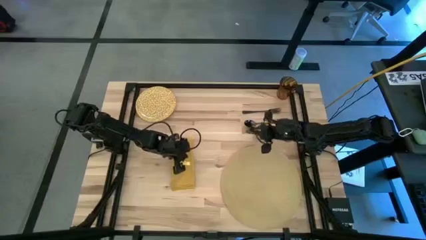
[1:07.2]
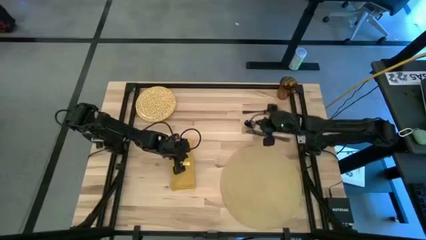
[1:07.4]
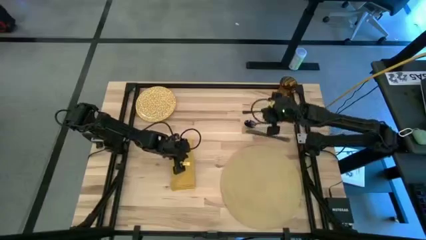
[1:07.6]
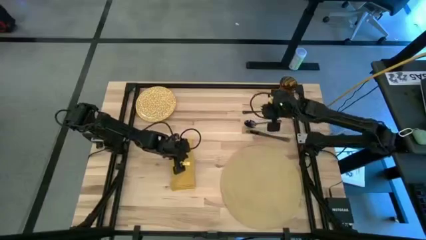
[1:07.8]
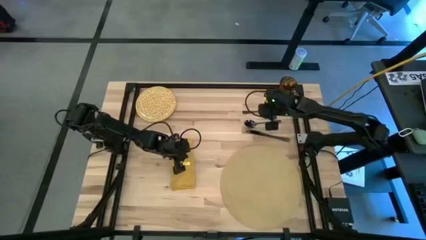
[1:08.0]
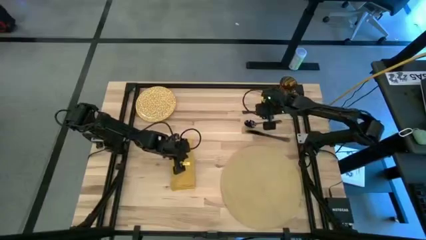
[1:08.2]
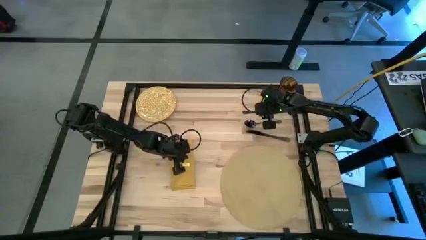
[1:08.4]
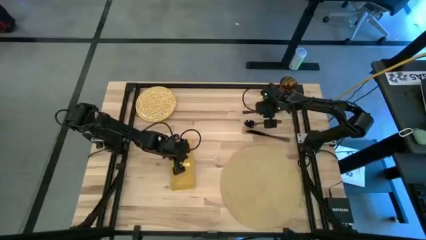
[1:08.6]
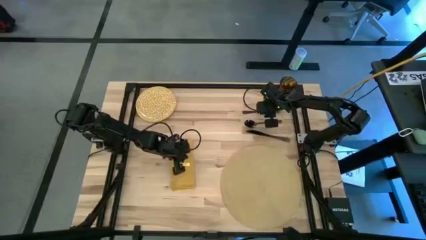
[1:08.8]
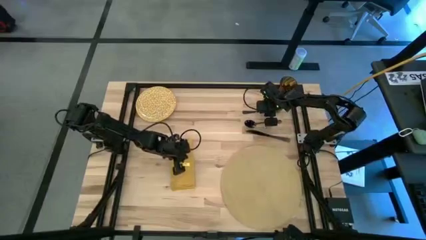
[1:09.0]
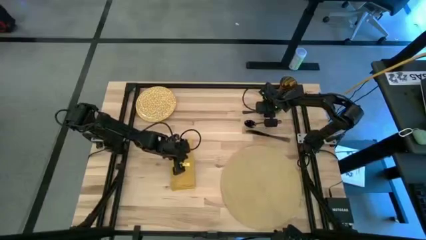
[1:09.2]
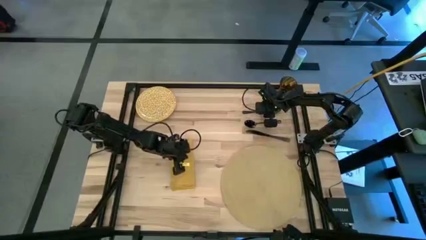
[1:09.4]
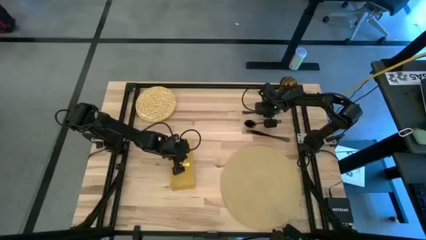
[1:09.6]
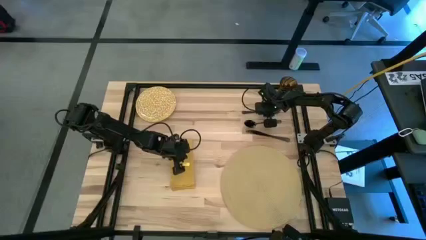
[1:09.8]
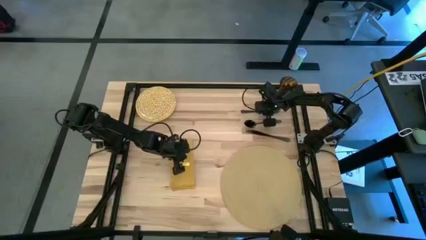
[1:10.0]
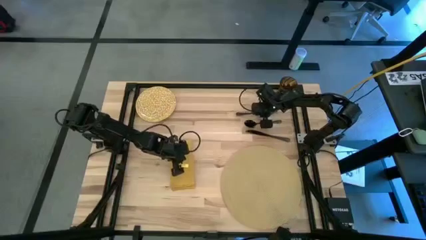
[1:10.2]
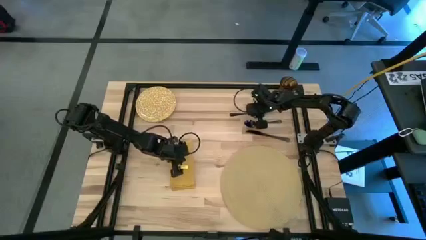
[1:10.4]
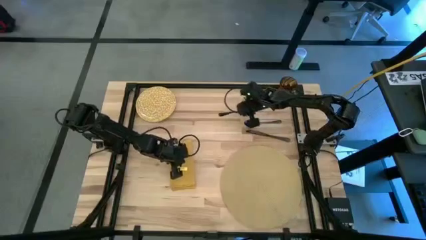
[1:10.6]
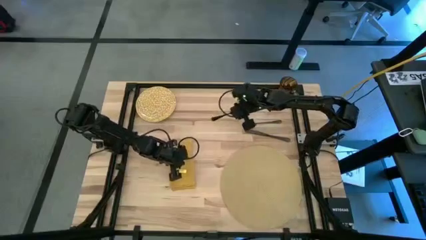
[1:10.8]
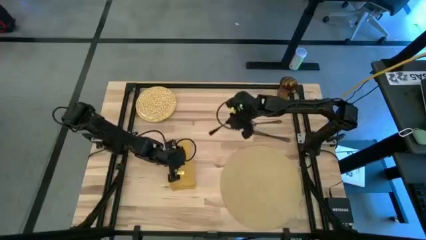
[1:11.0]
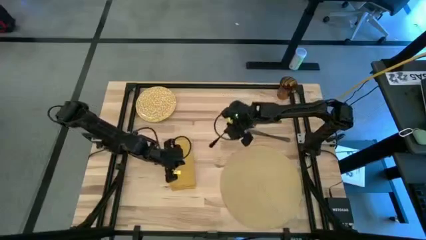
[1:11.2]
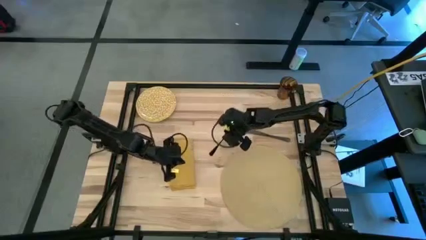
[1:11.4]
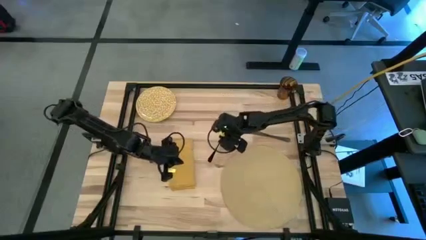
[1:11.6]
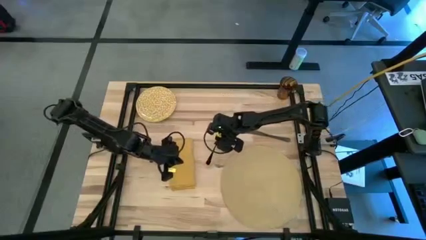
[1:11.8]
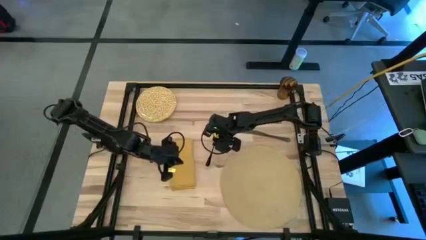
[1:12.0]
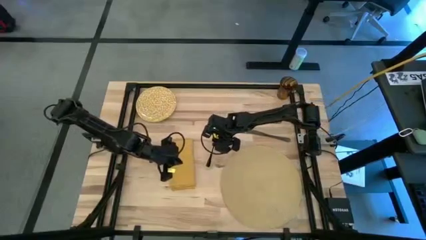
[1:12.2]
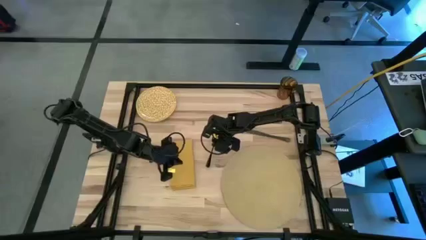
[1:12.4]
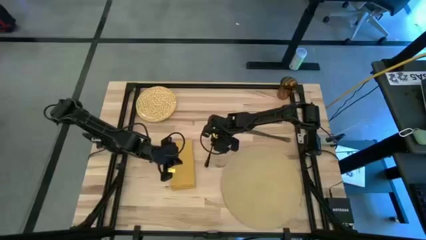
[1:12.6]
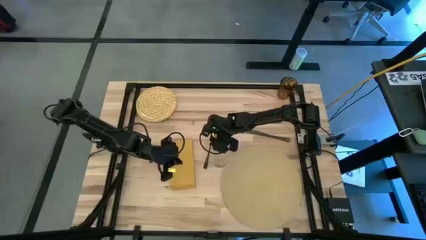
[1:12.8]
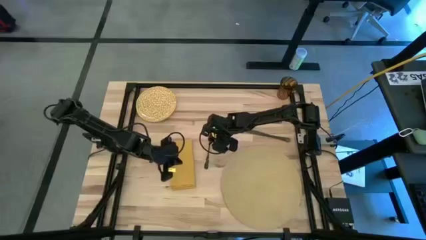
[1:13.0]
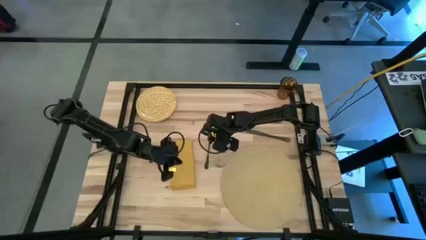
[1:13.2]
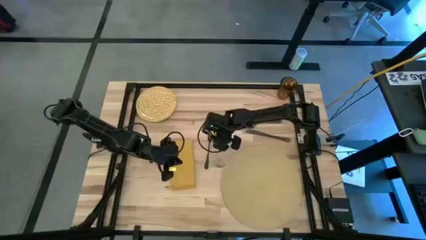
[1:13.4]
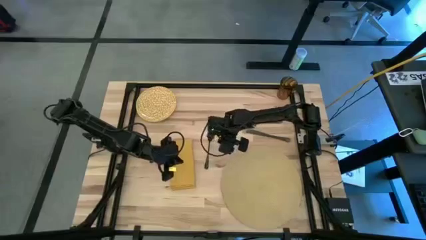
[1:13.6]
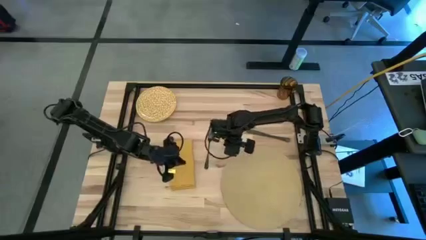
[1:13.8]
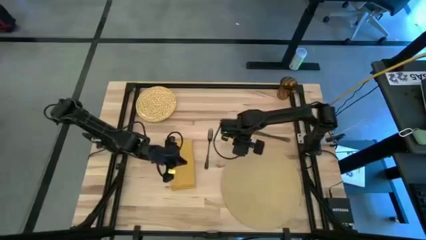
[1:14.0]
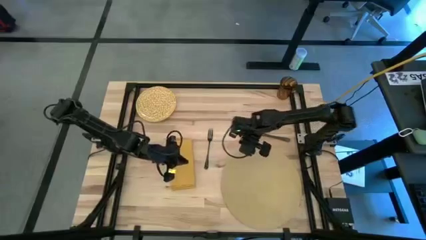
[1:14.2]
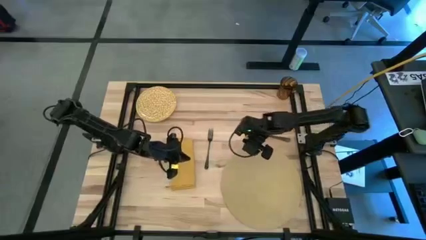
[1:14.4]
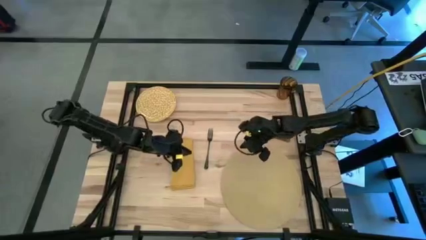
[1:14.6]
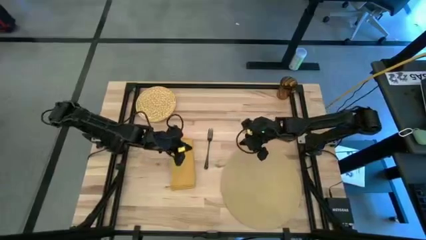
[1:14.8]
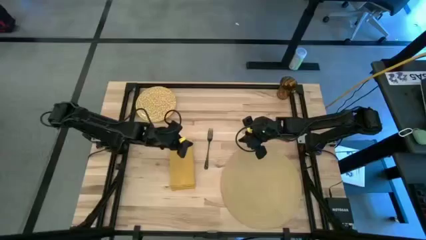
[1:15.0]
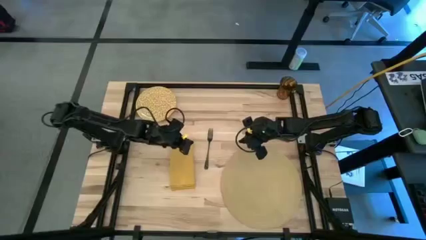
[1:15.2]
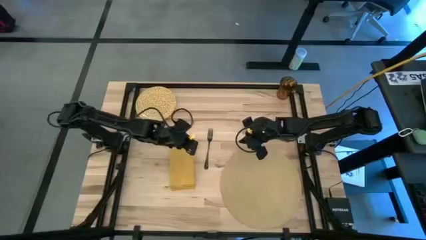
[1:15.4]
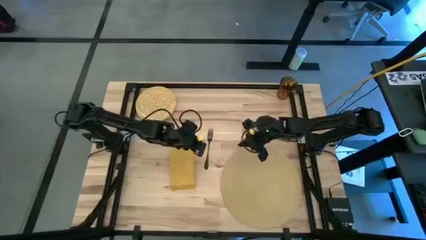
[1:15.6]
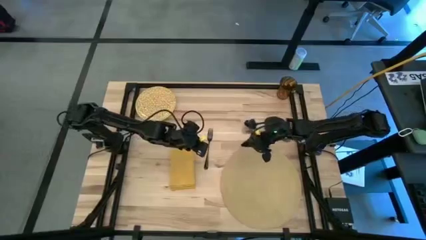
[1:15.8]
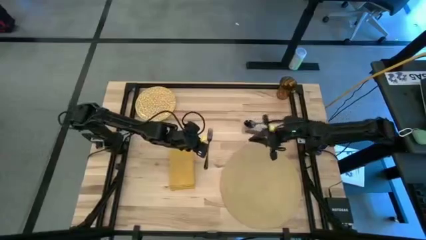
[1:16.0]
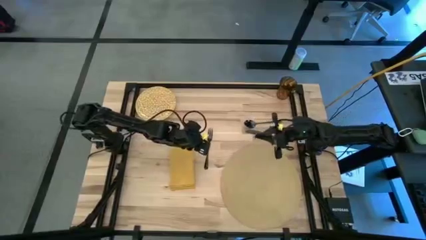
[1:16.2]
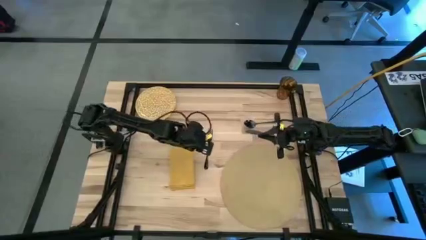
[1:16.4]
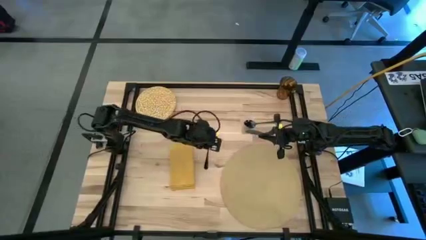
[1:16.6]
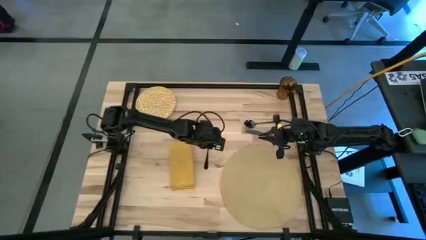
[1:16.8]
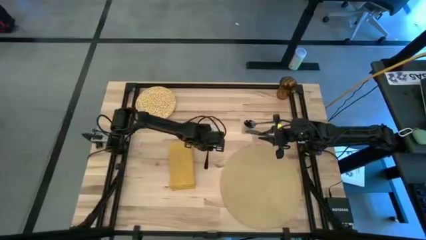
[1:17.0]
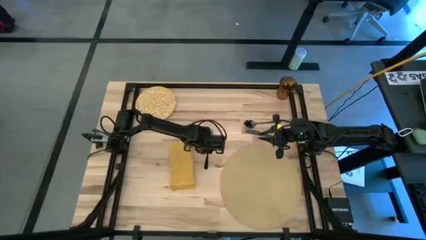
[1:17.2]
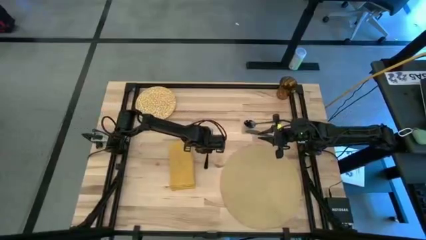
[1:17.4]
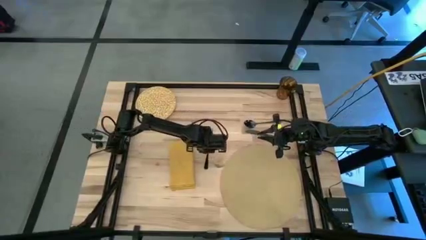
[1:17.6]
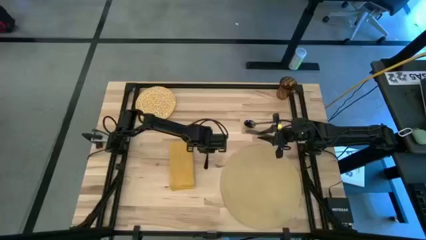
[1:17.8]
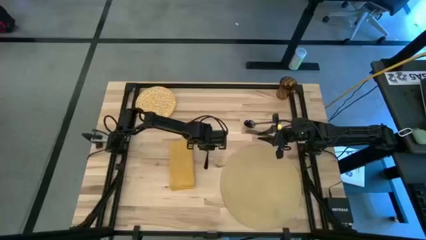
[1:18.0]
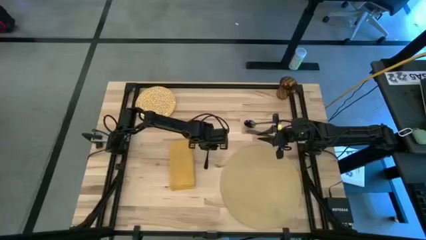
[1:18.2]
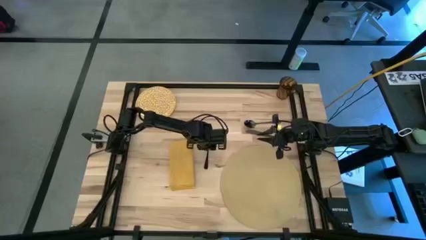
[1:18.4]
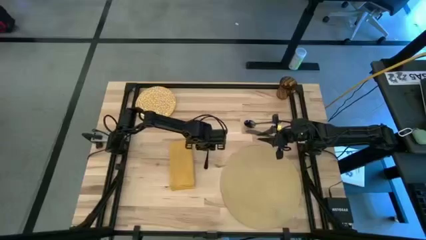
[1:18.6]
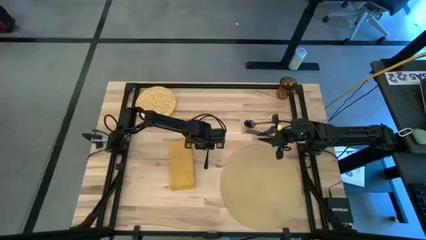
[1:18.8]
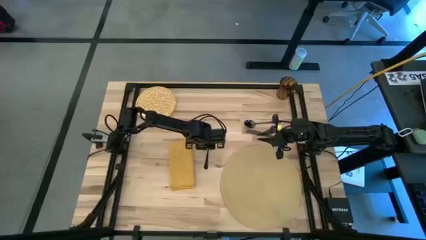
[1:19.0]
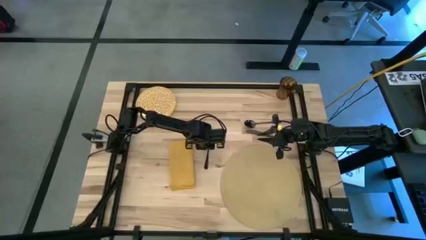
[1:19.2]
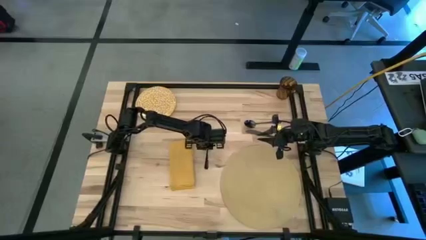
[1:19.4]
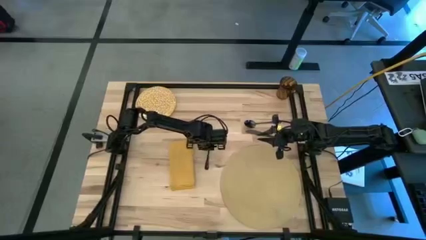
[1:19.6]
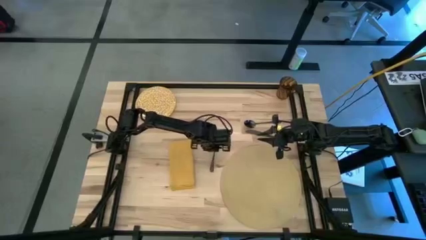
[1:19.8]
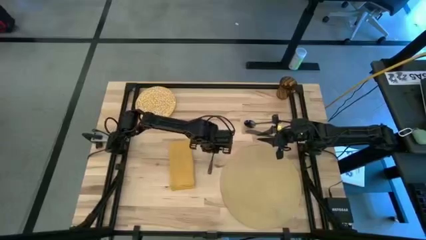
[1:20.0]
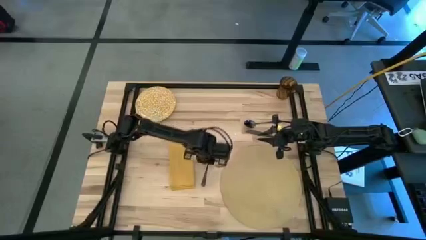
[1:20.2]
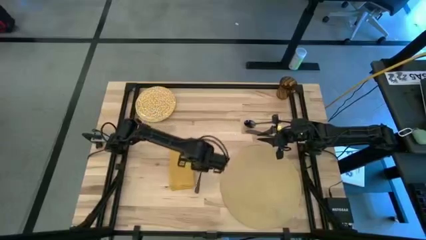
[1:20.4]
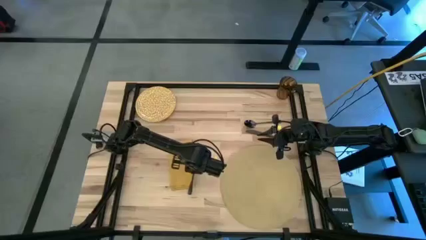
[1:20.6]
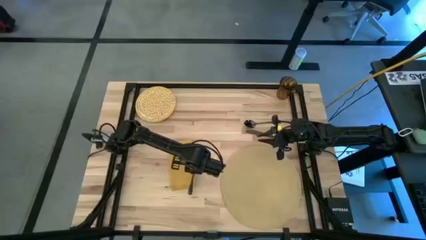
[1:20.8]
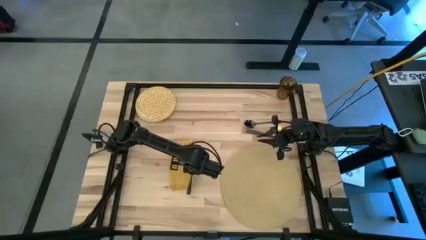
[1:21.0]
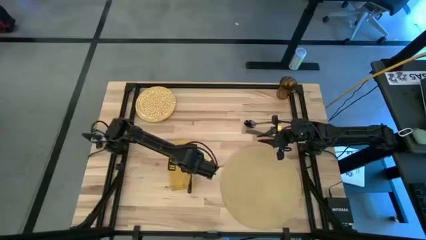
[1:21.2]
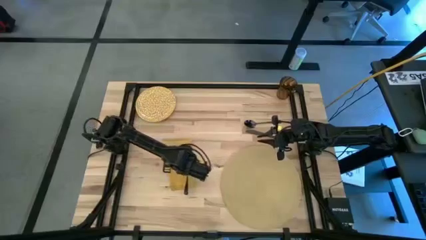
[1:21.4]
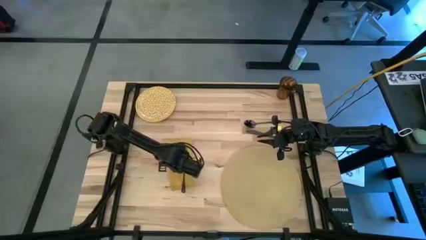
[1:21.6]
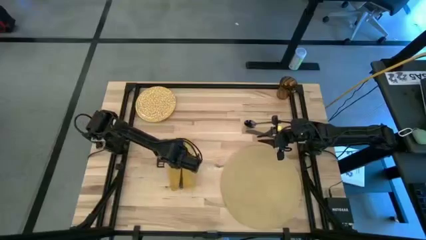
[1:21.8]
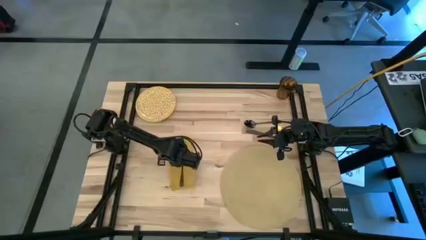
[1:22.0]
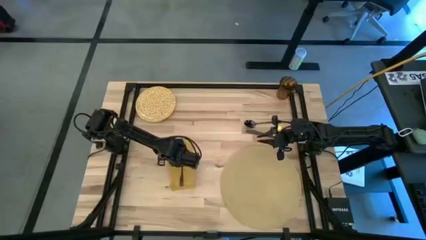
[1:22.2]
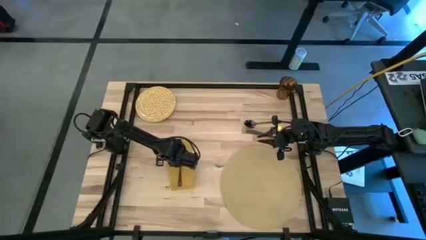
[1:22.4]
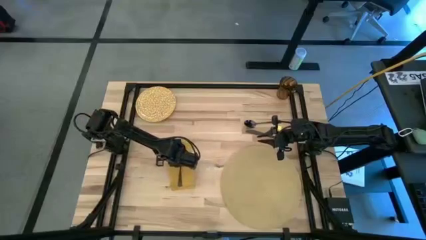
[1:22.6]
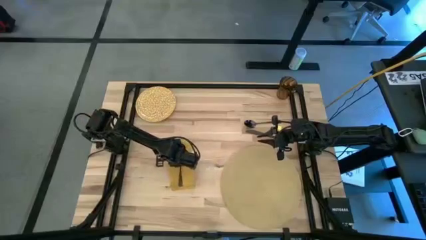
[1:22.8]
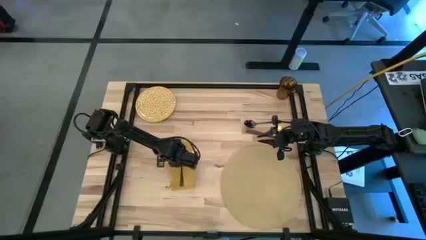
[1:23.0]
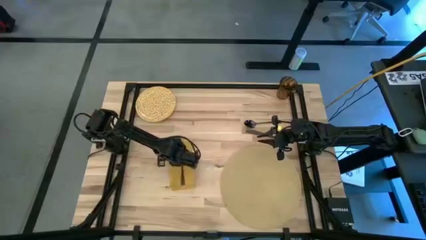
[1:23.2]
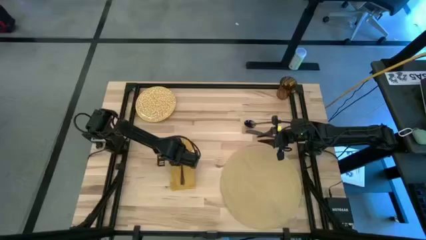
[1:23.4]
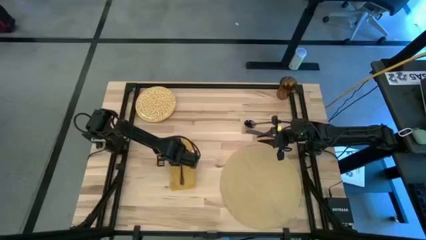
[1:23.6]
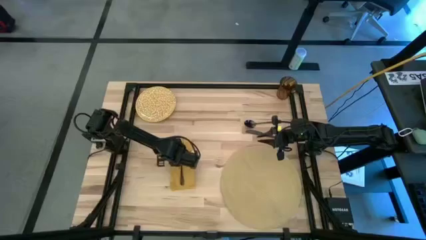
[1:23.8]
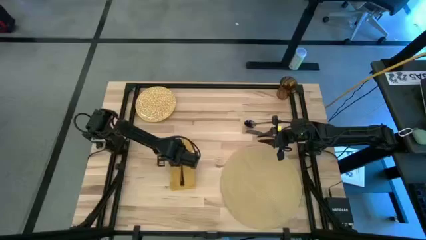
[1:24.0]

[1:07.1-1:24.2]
Task: Set table place
Put the black fork on the yellow table napkin
